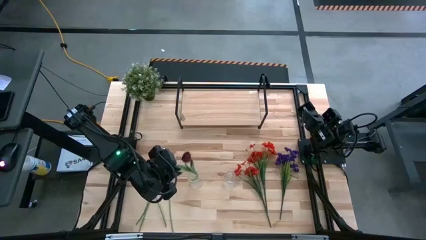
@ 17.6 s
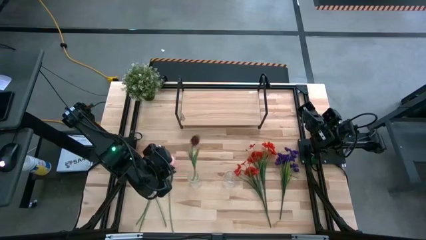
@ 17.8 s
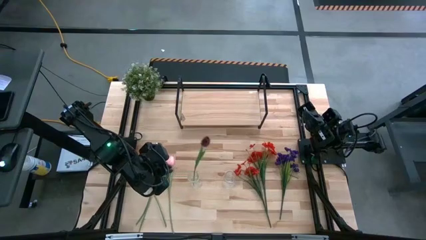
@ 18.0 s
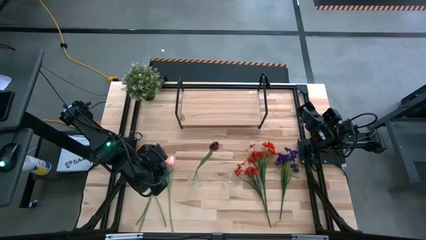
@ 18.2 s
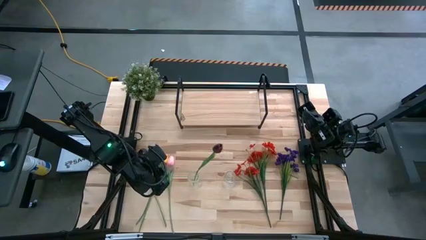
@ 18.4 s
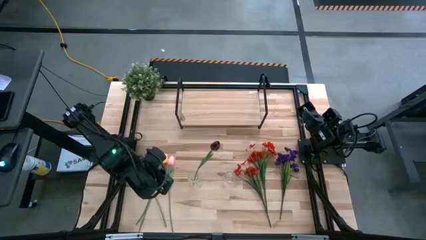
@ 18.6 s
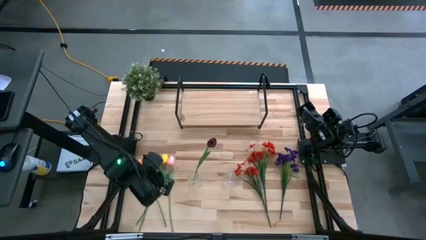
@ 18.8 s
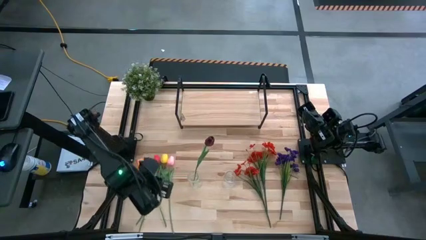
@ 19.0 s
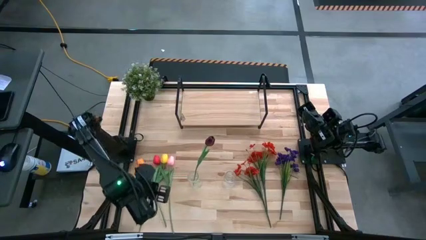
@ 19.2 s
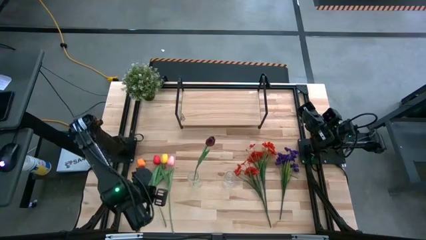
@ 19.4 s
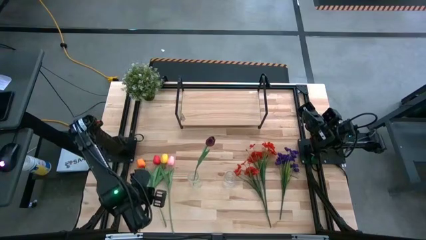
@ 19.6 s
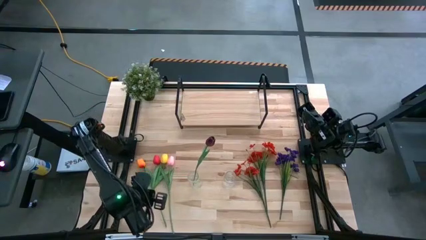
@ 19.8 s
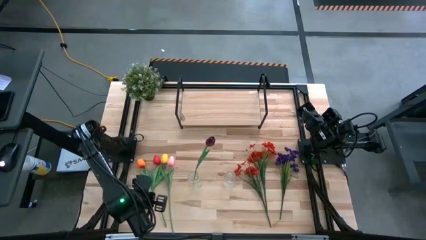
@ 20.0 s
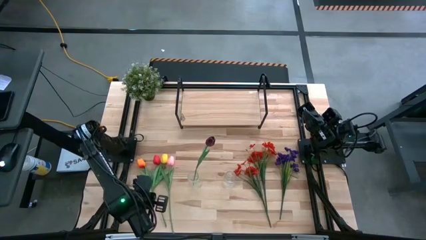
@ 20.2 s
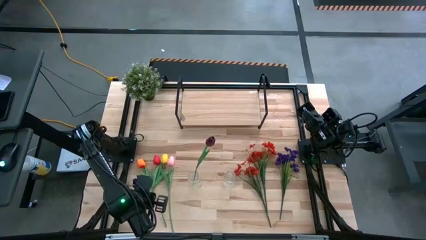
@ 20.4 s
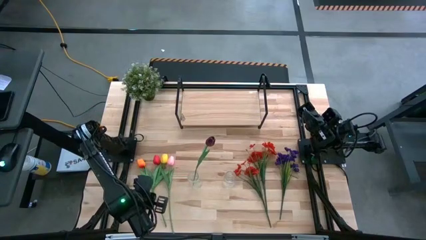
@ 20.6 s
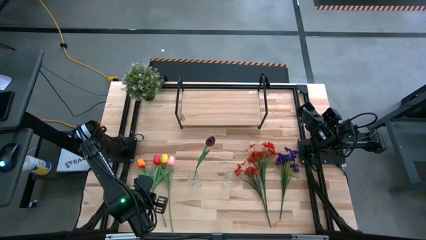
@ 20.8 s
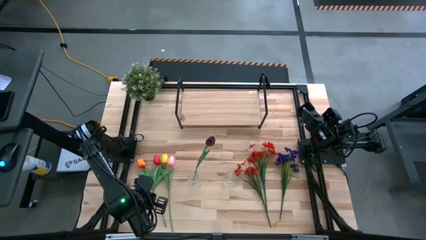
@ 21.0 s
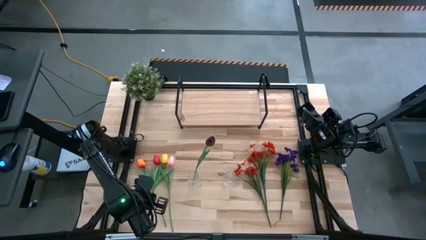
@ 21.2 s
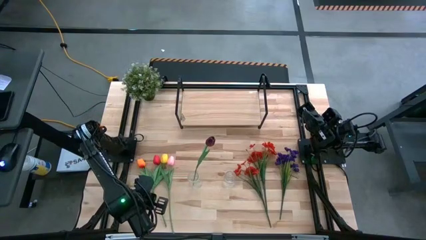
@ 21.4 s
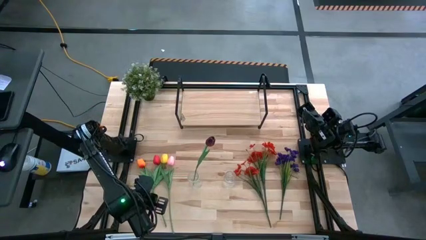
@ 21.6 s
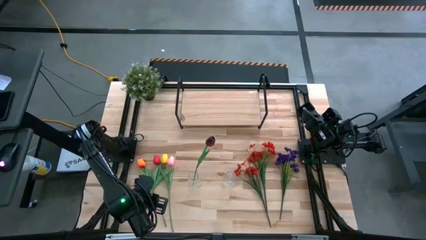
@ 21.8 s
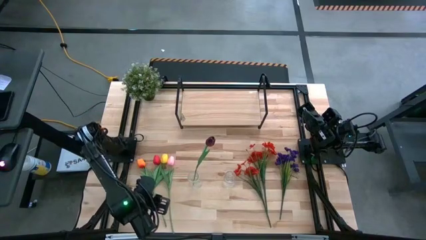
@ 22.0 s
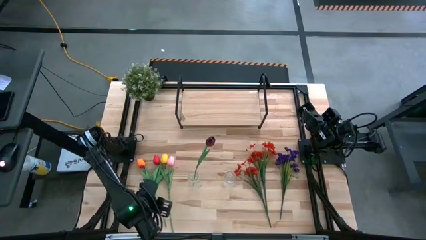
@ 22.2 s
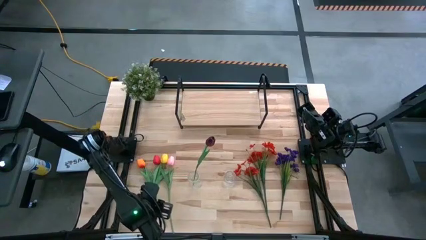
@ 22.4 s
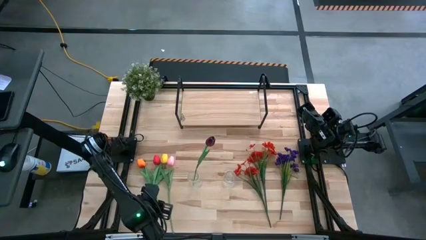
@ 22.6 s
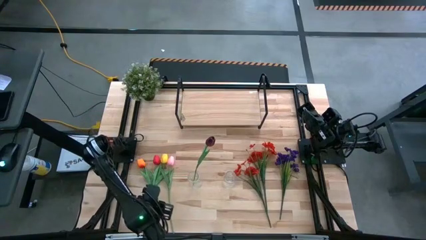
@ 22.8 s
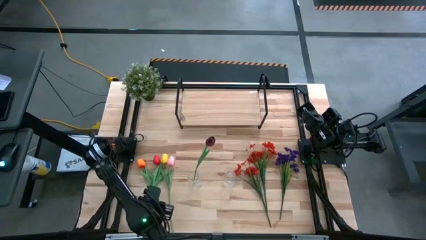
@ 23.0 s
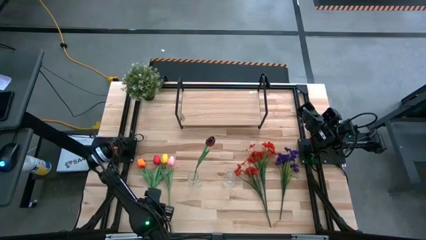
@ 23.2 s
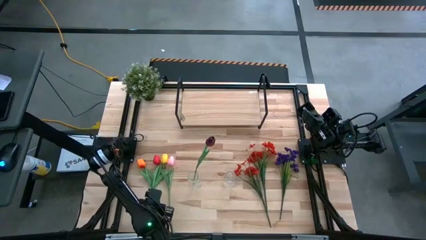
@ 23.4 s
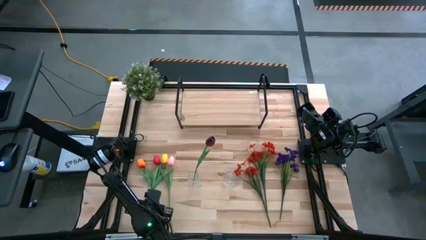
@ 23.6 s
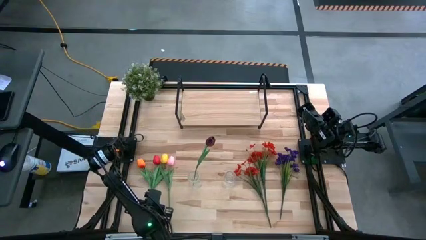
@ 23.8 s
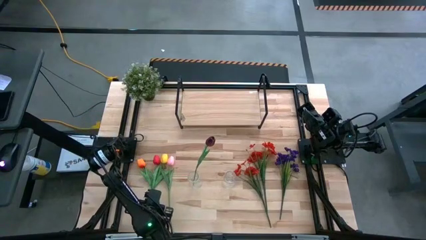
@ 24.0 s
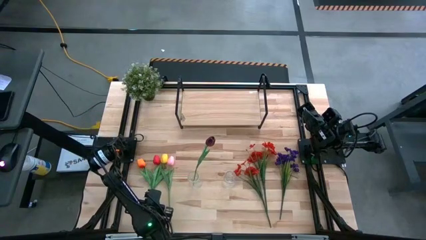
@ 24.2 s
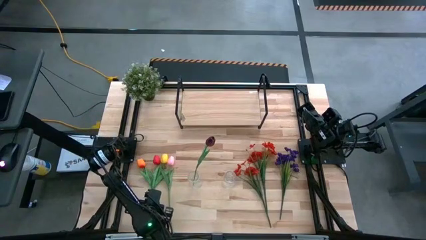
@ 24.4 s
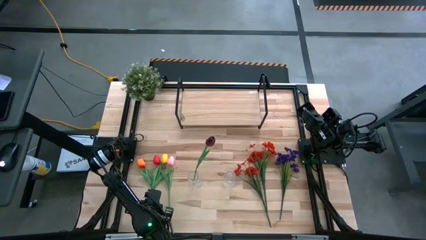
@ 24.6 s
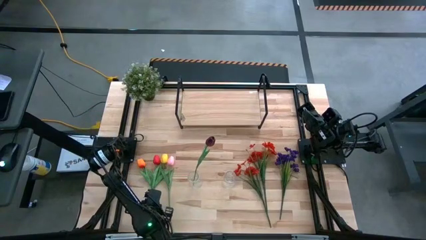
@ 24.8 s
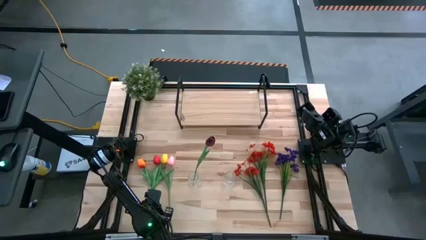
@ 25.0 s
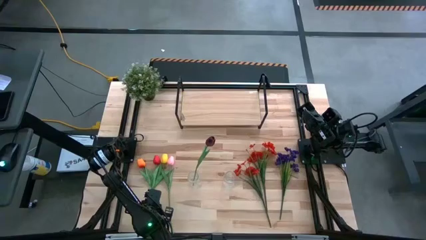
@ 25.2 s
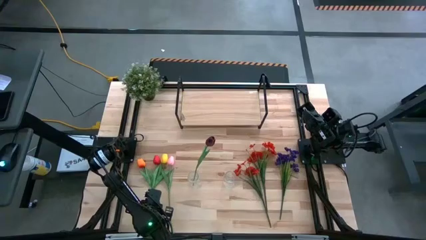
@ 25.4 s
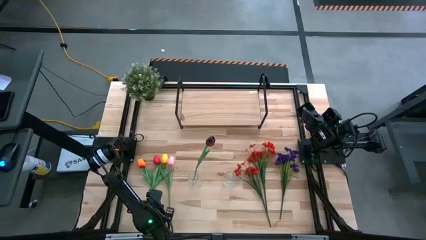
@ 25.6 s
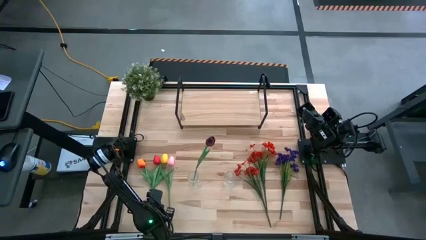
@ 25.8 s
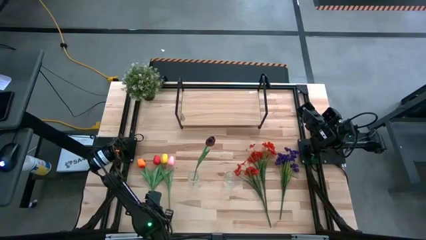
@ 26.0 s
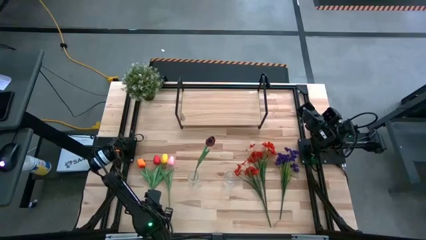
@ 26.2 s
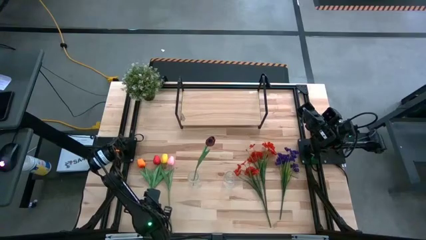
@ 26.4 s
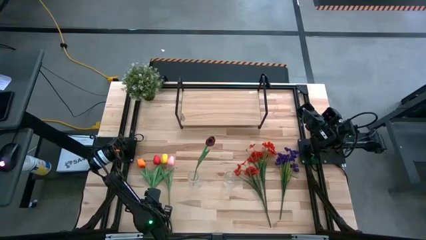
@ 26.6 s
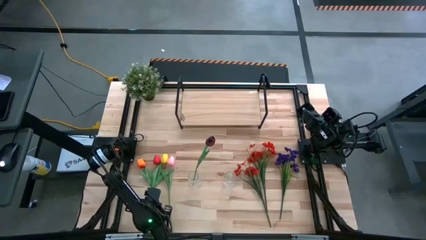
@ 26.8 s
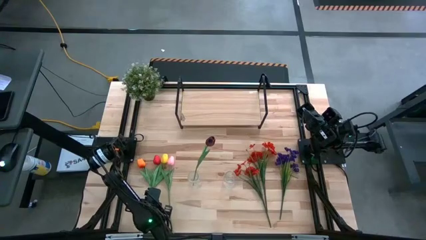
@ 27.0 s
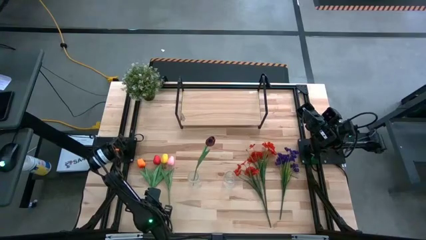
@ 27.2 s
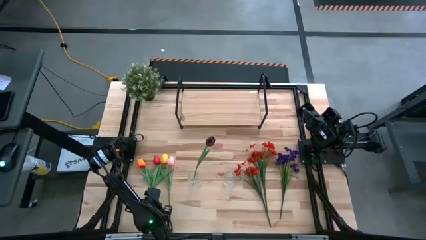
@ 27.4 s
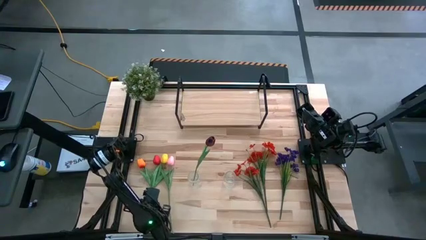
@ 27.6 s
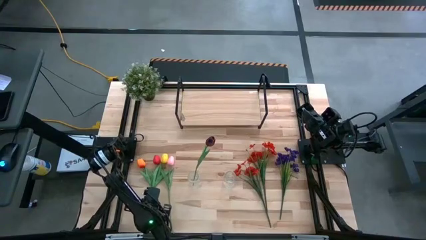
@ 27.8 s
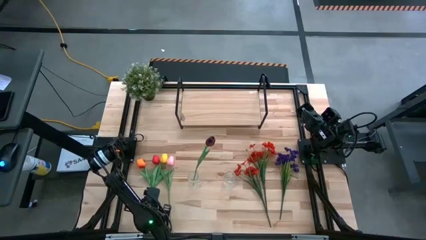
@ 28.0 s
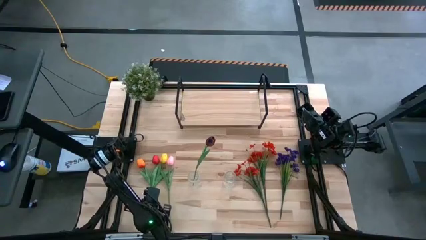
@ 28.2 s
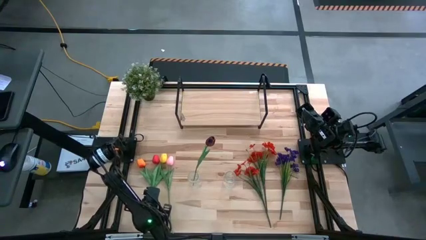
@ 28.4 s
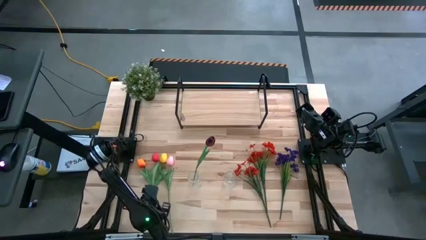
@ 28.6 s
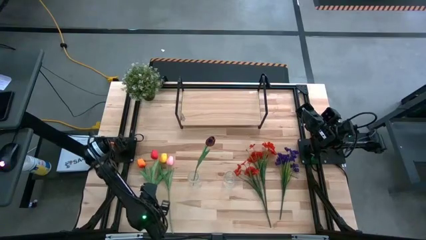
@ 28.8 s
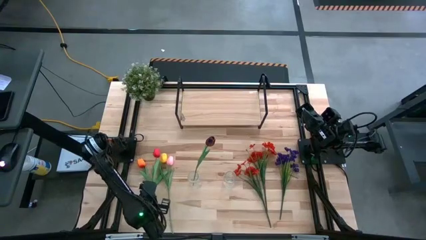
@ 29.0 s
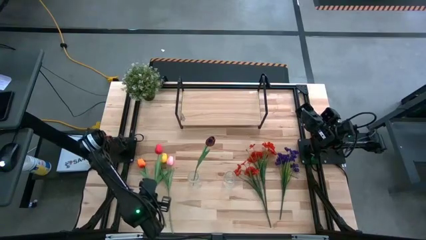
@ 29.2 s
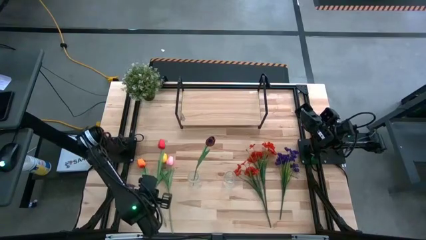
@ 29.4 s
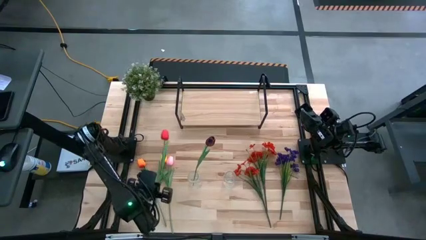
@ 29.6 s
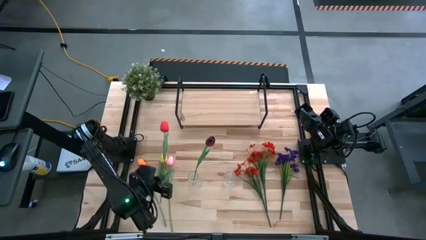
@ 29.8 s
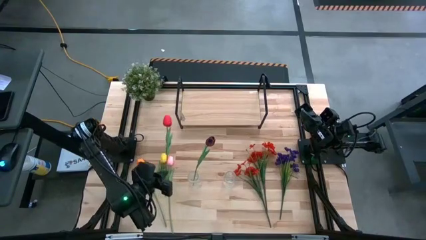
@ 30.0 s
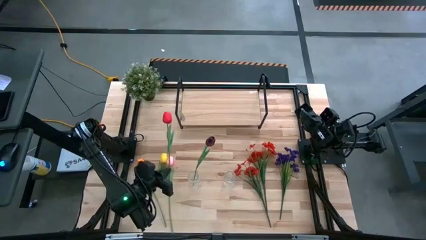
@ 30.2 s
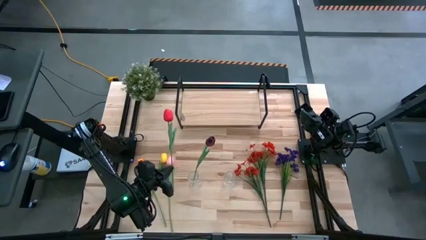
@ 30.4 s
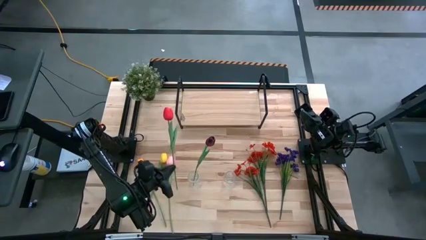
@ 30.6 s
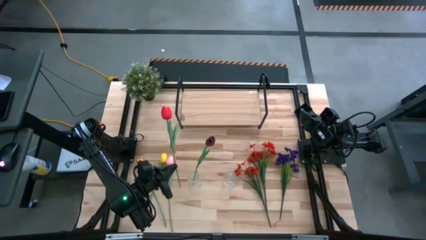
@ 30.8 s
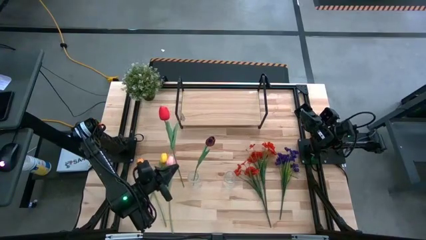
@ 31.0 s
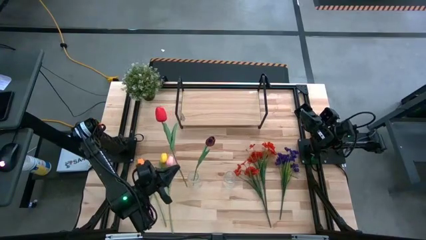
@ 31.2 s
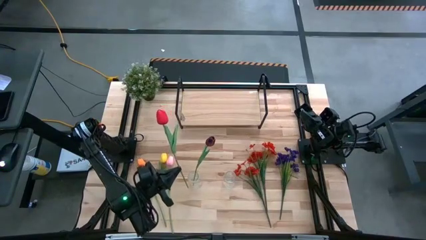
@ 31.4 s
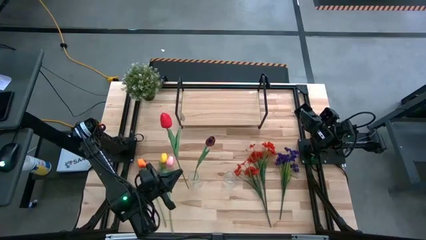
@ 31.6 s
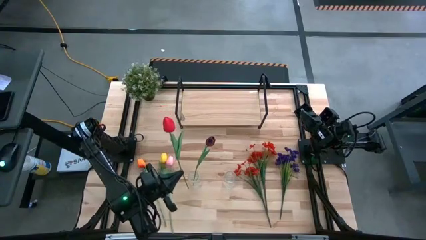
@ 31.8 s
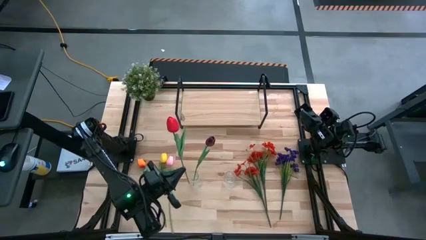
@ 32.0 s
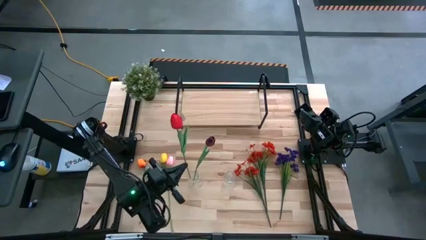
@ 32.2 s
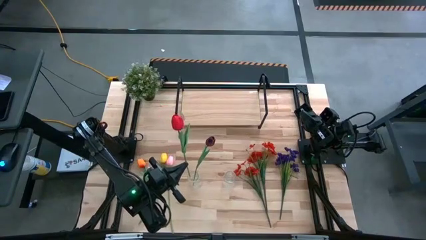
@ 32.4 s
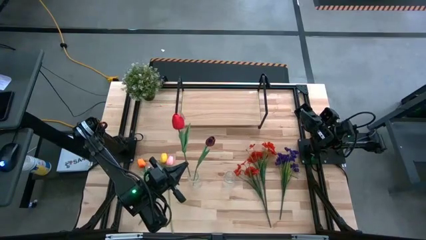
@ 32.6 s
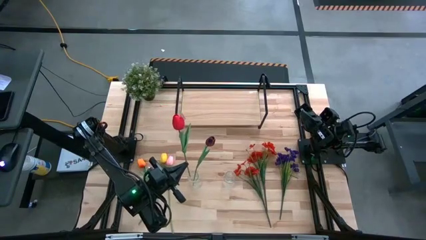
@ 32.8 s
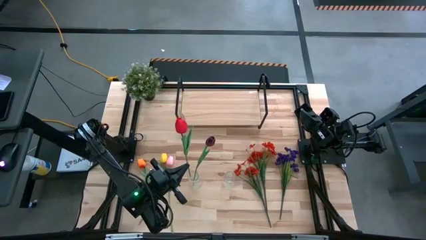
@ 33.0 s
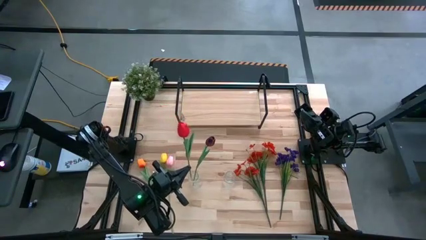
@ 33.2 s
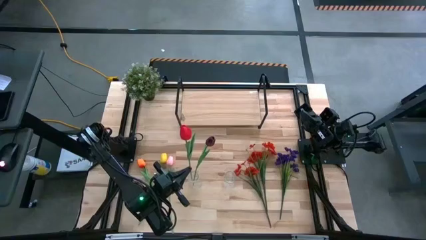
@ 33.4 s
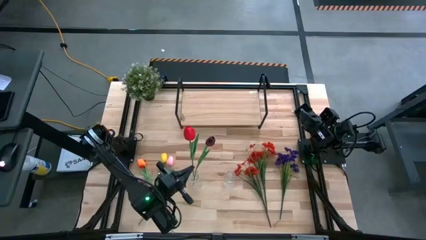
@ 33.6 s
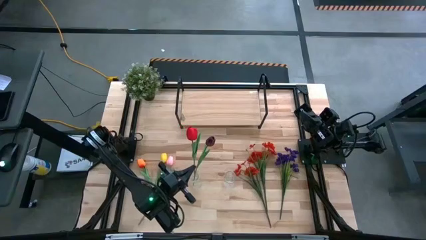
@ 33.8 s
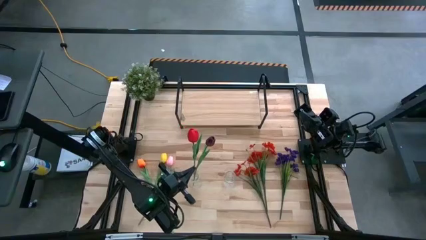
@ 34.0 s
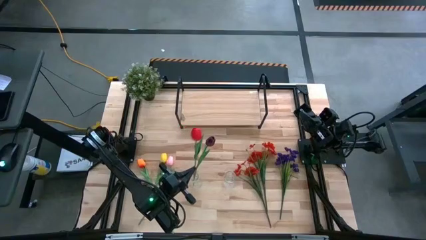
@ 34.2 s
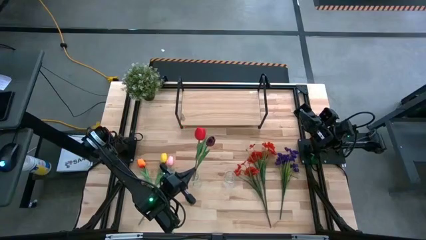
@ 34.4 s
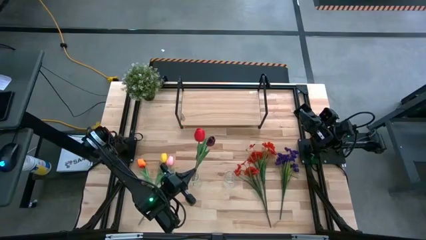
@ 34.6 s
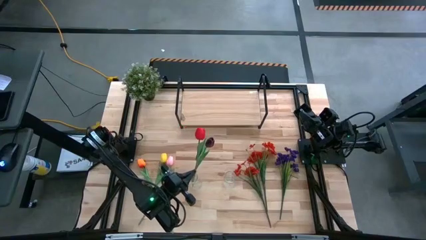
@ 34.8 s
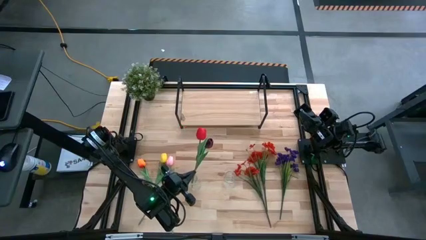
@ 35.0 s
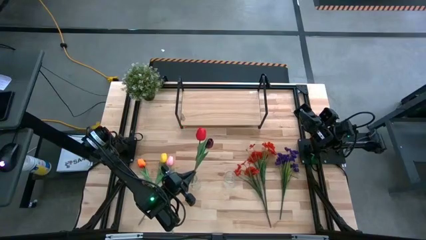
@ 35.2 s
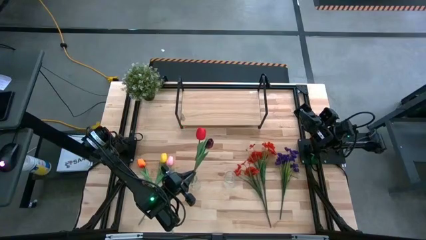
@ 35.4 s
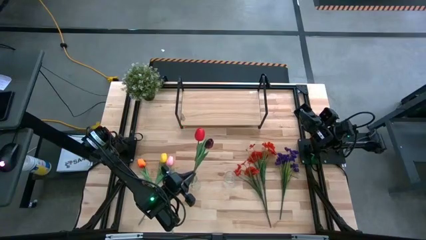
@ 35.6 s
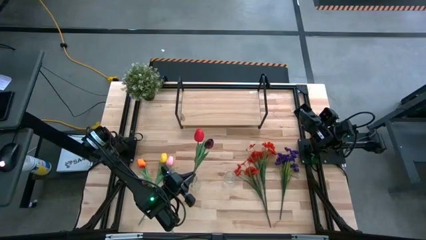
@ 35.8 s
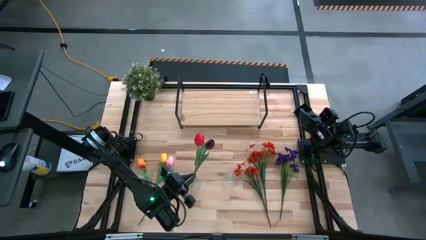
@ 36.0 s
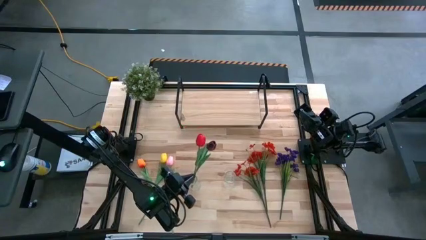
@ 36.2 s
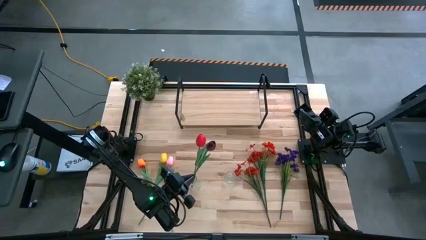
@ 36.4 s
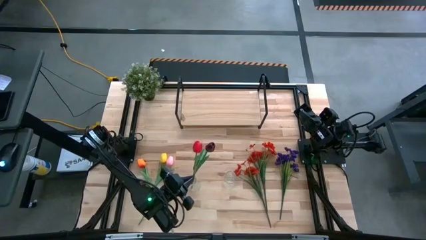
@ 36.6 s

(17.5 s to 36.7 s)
Task: Pick and place flowers into a vace then onto a shelf
Put the left red flower into the left transparent vase
